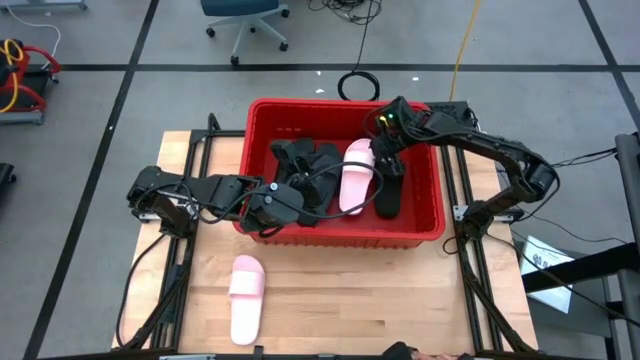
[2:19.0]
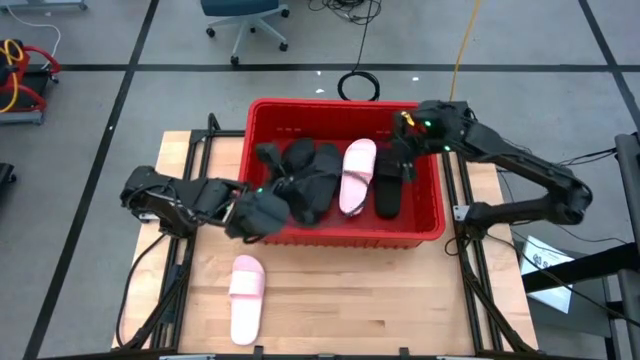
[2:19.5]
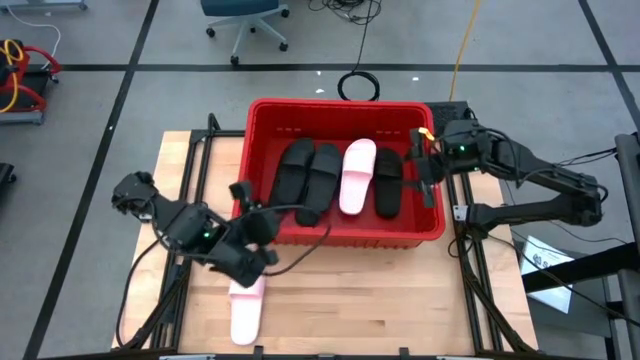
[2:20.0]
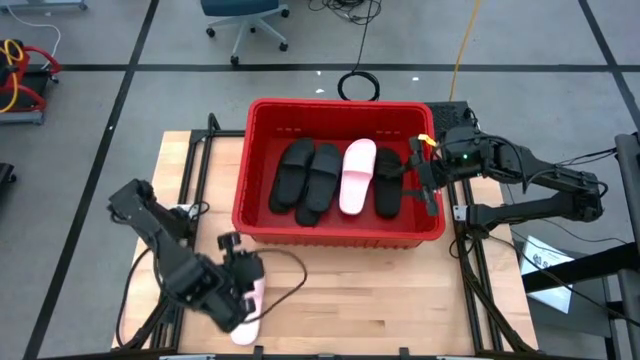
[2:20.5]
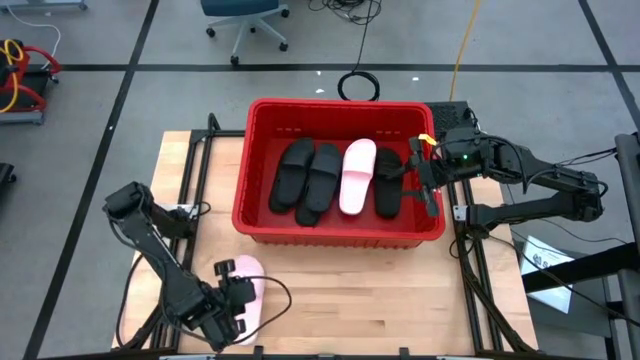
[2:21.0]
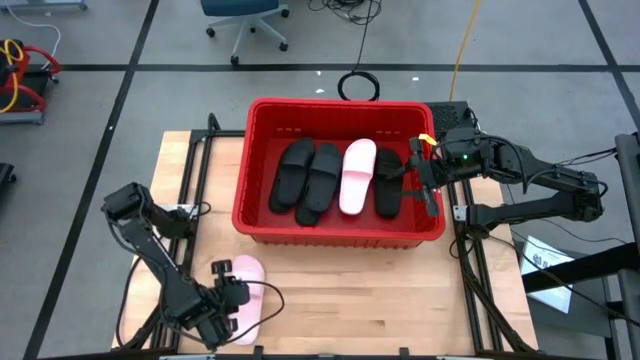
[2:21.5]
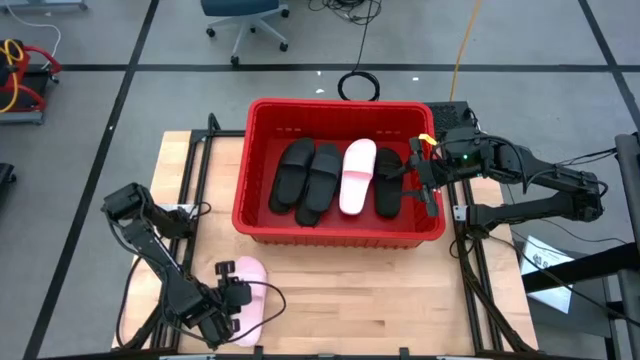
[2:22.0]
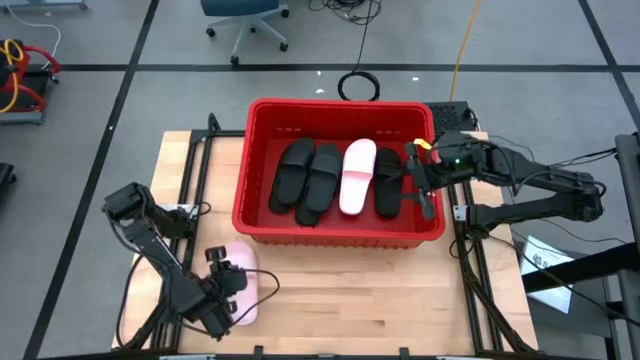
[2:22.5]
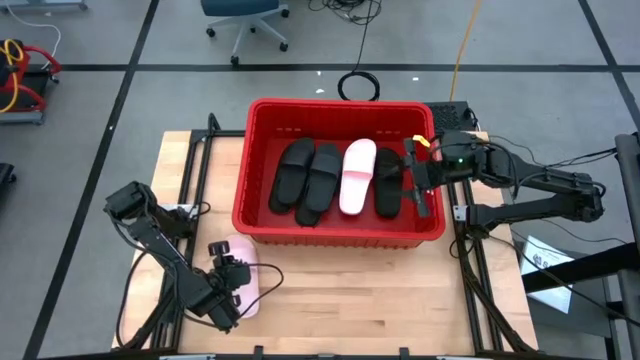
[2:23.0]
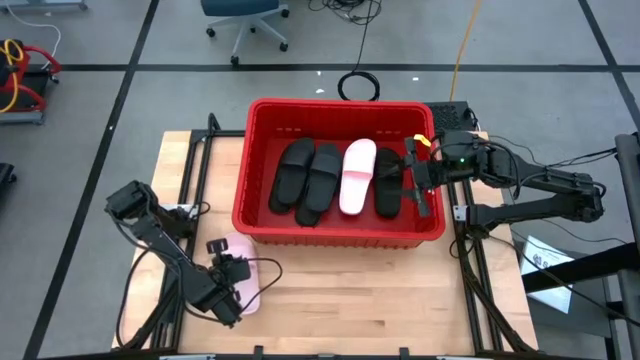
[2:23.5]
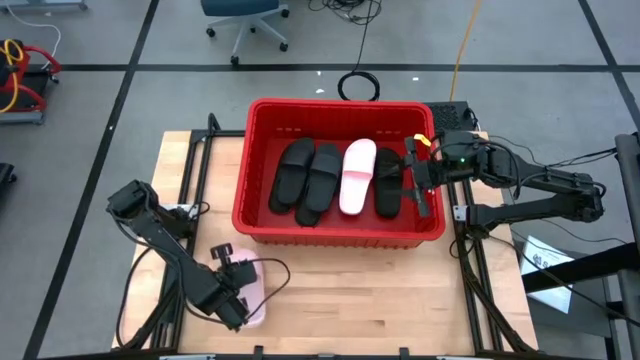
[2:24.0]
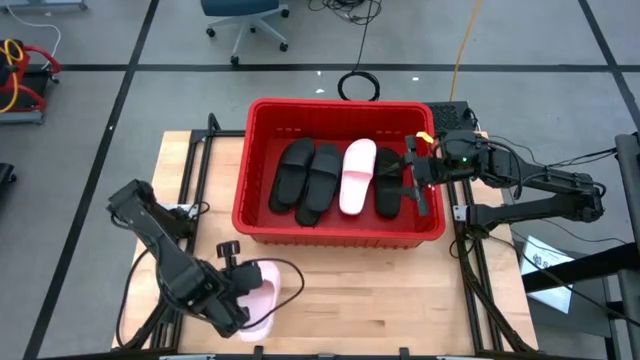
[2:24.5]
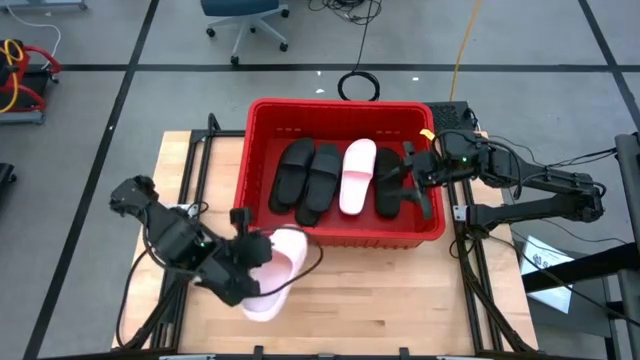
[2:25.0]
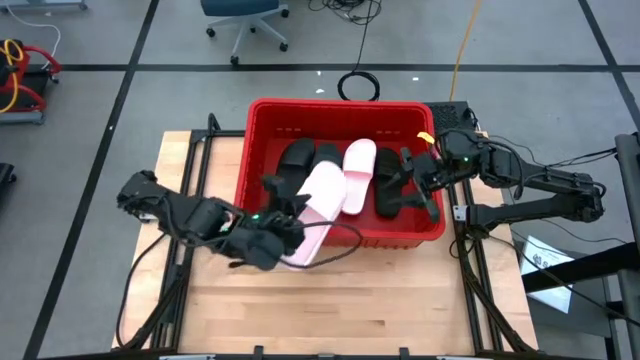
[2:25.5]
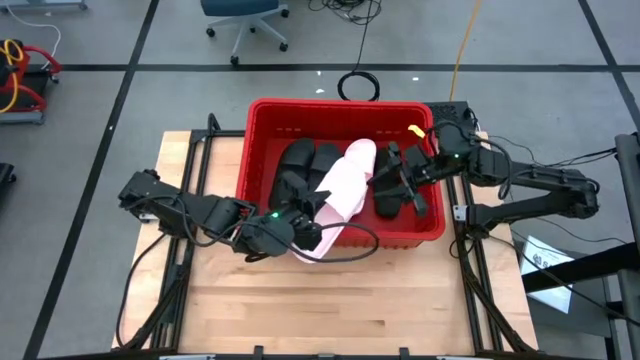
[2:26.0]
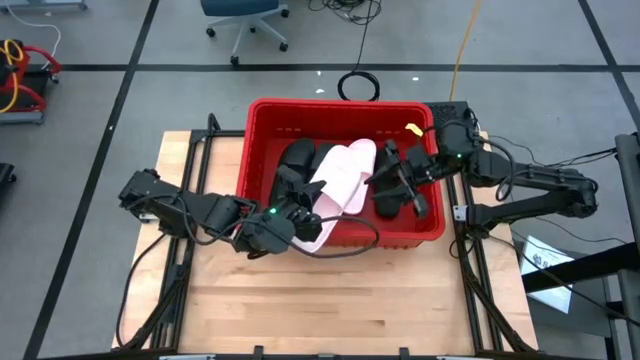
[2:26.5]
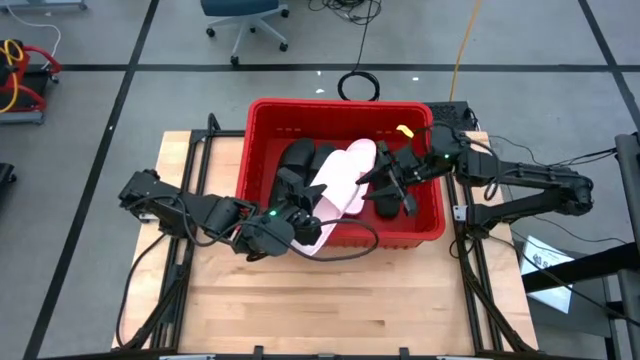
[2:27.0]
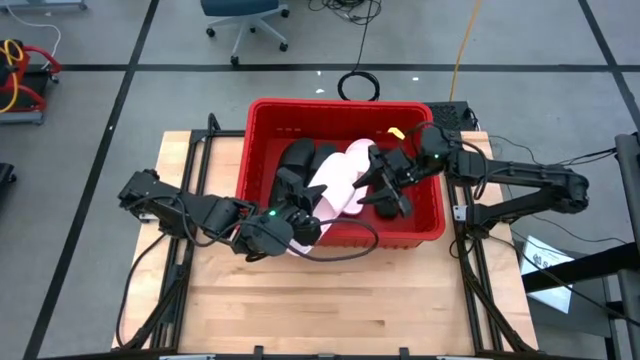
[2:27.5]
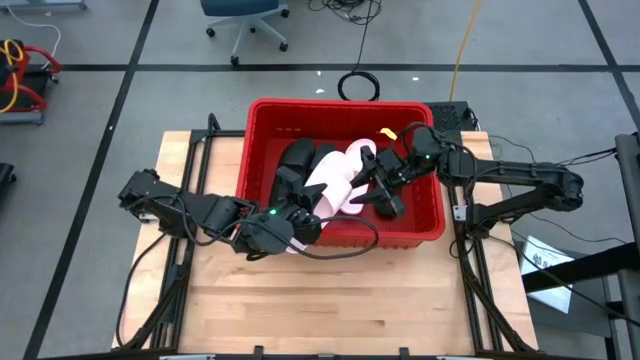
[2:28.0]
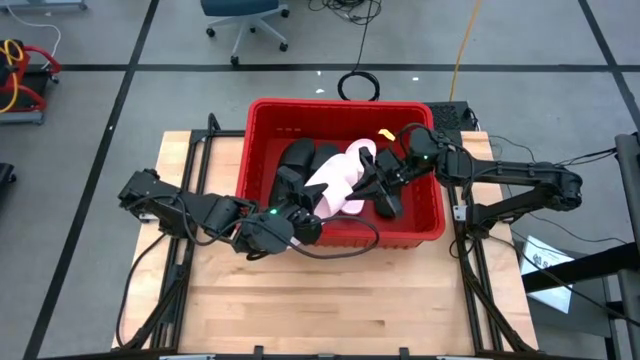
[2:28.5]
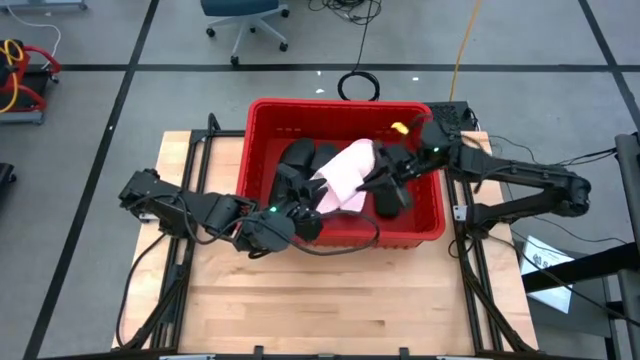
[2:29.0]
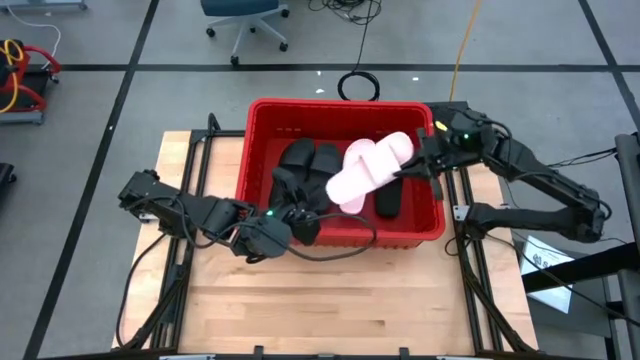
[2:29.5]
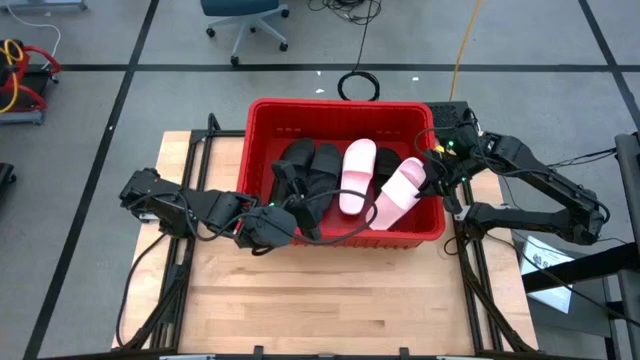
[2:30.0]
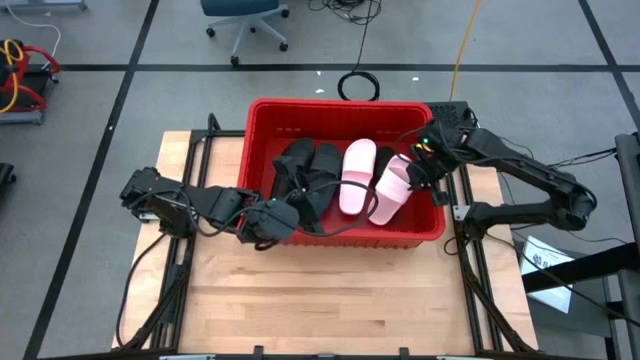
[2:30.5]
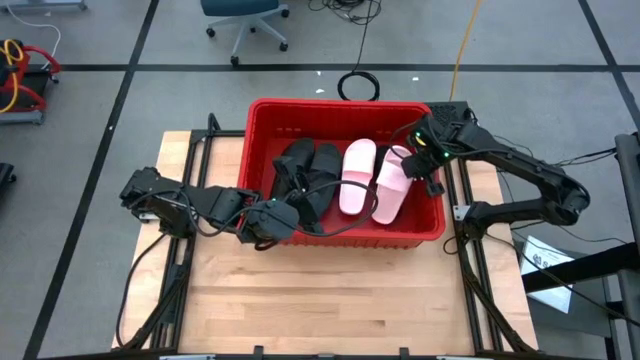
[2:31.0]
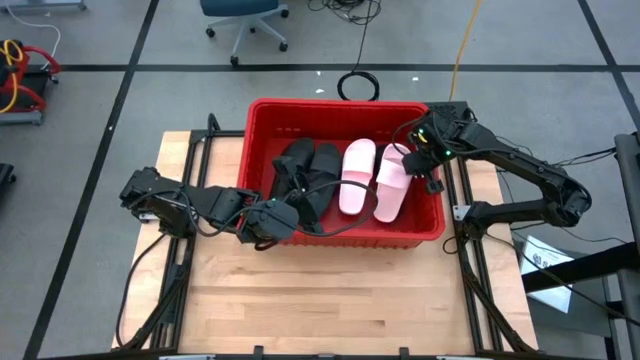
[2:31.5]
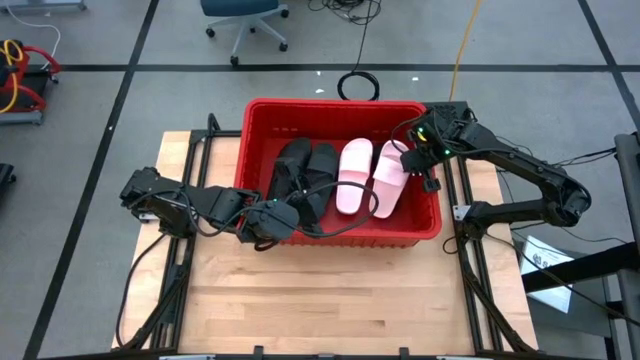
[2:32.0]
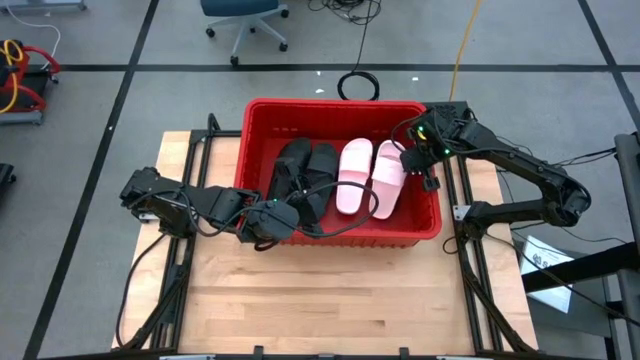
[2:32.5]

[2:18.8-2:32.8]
Task: Pick and place slides into bin
Put the pink slide into the red bin

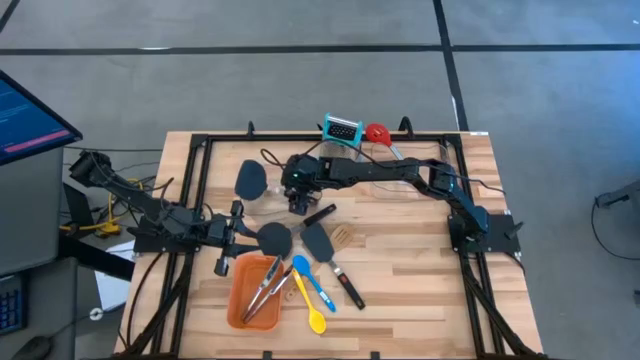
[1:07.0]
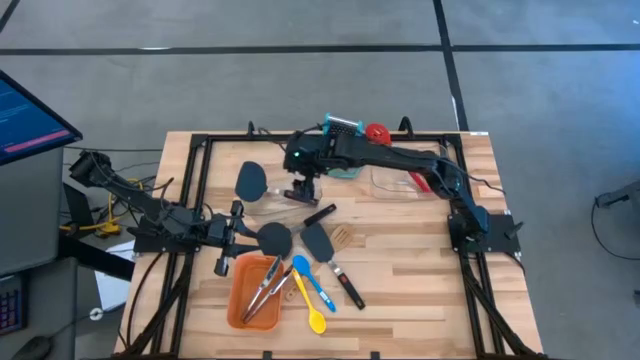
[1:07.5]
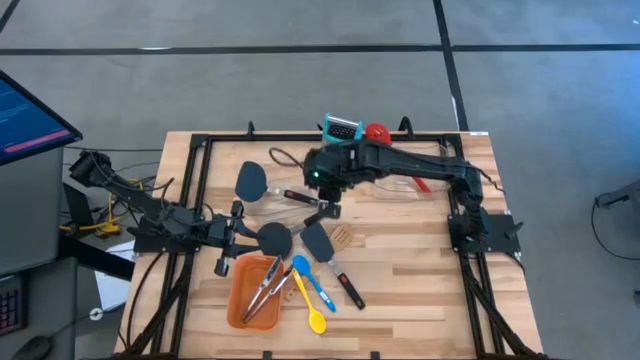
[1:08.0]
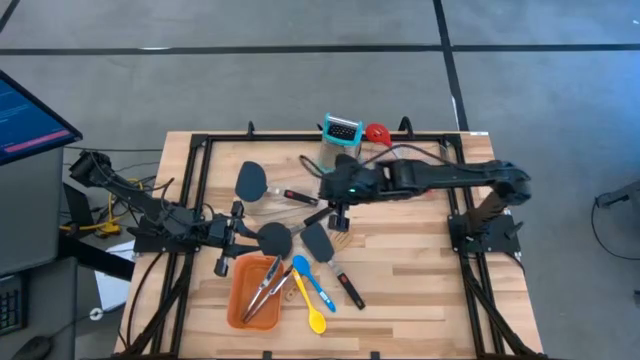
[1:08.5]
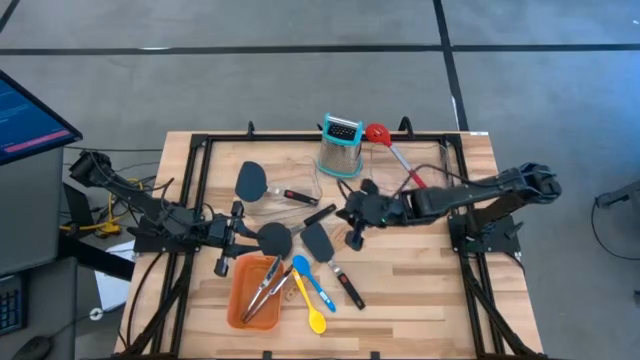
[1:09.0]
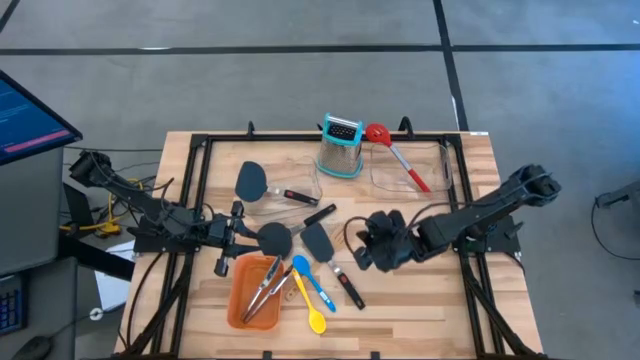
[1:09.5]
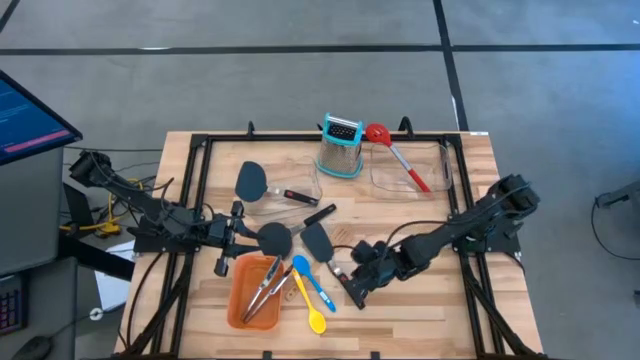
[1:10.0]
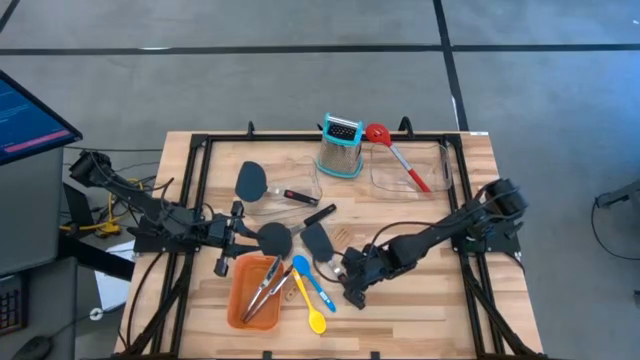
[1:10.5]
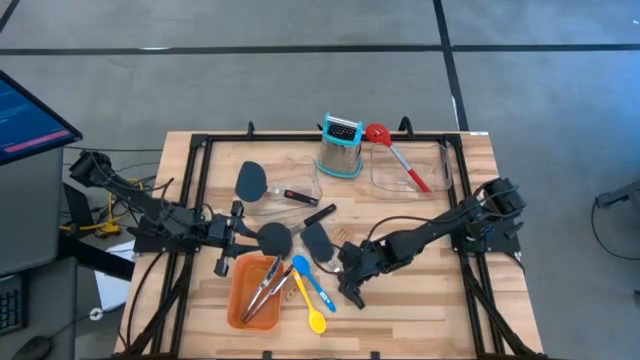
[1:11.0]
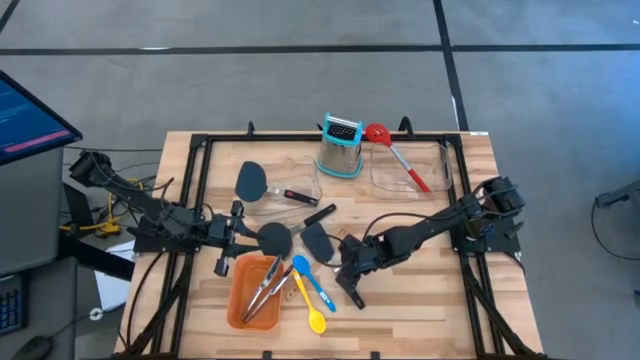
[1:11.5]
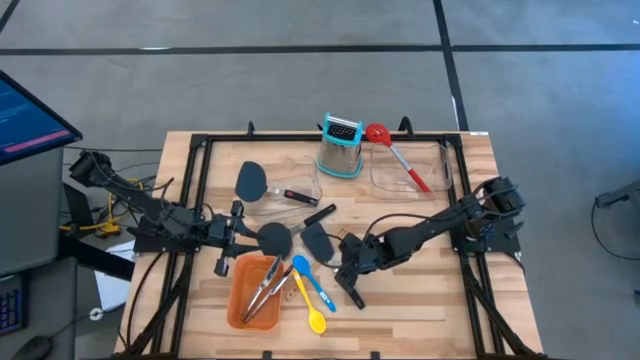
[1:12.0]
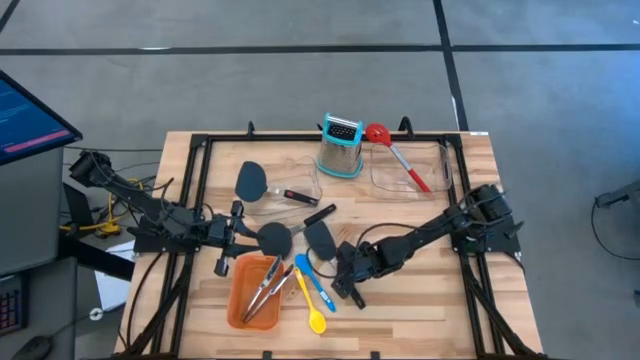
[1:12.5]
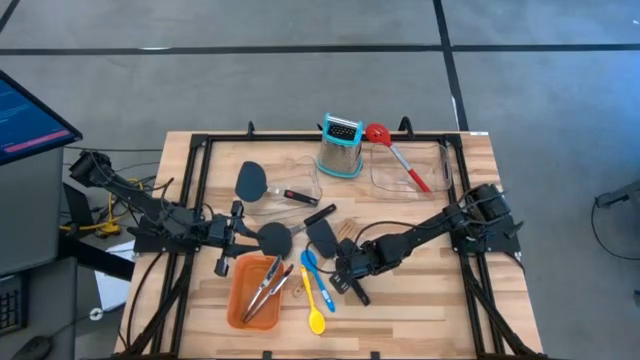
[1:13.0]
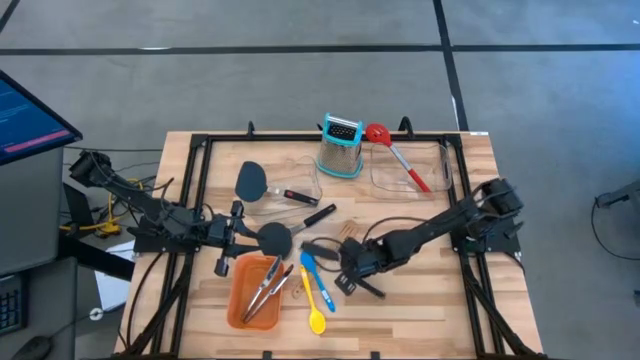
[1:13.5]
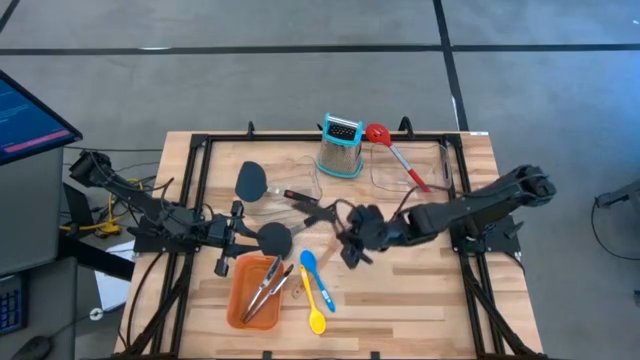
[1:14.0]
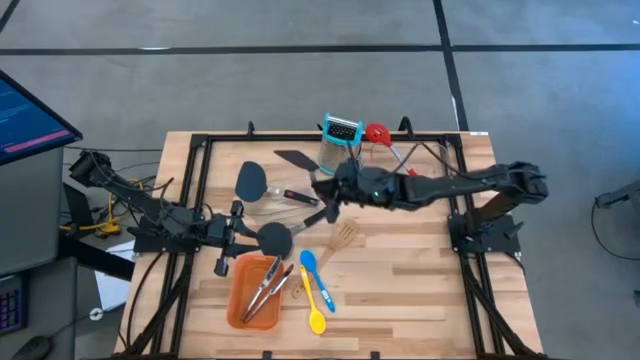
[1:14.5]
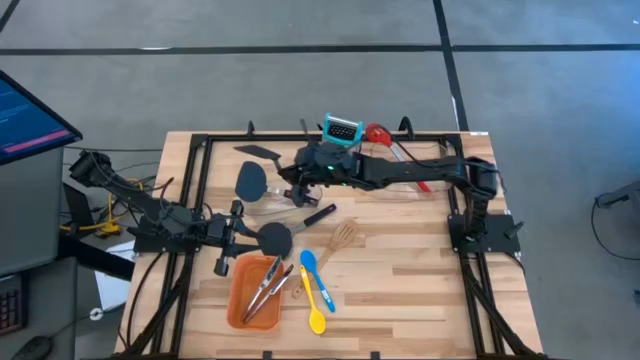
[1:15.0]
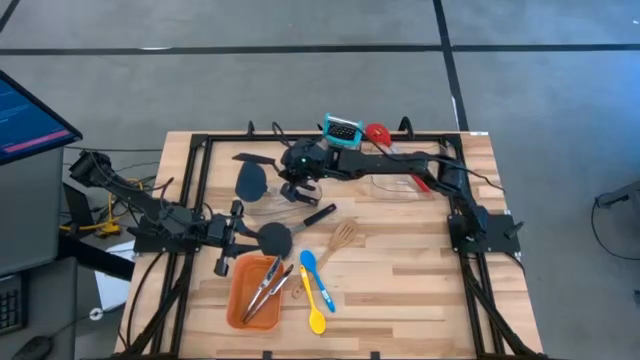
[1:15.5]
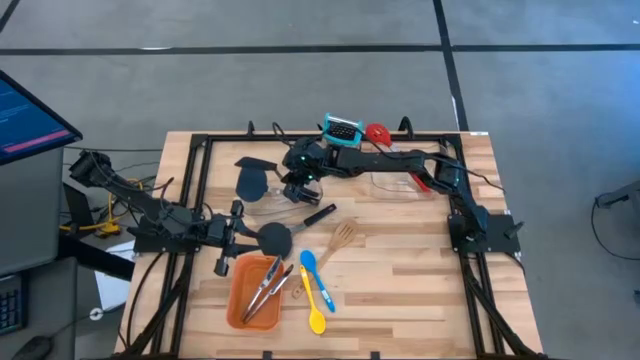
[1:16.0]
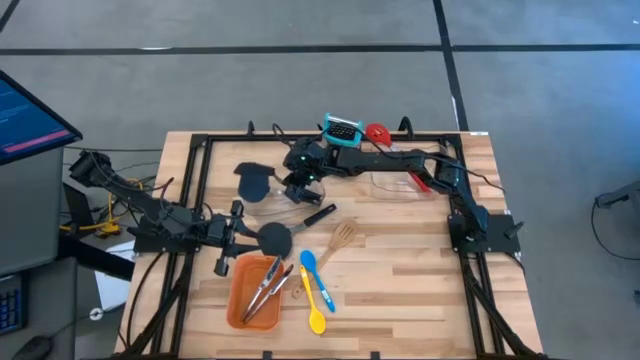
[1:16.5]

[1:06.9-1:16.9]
Task: Pick & Place Kitchen Items
Put the right black spatula into the left transparent bin
